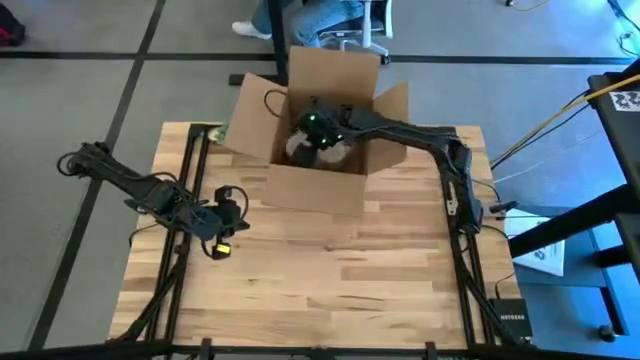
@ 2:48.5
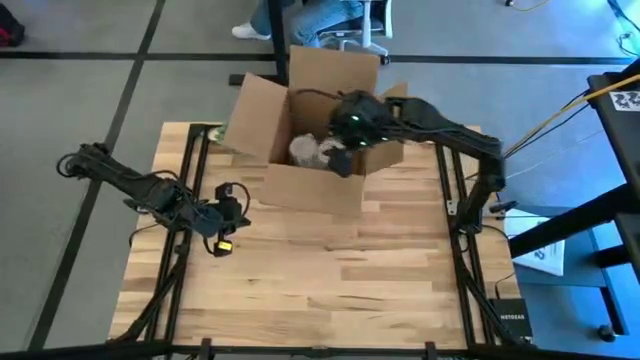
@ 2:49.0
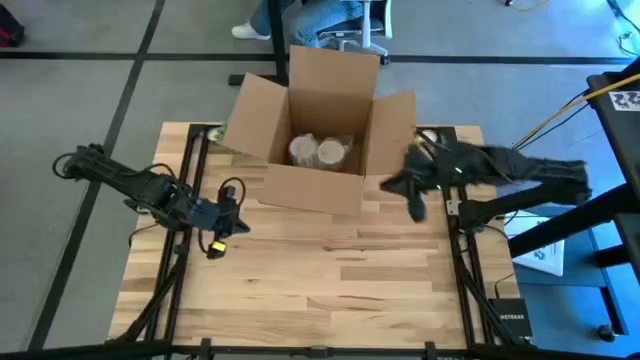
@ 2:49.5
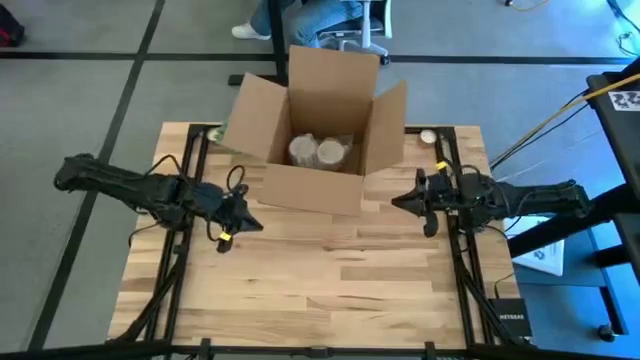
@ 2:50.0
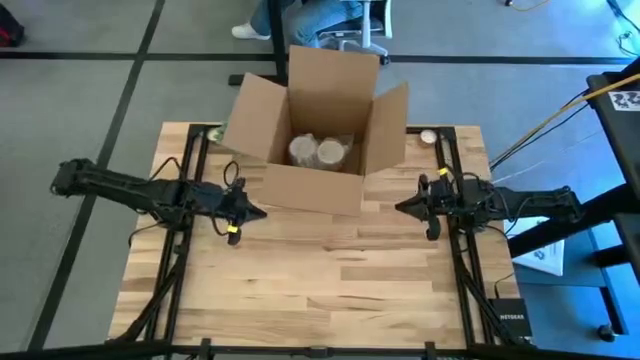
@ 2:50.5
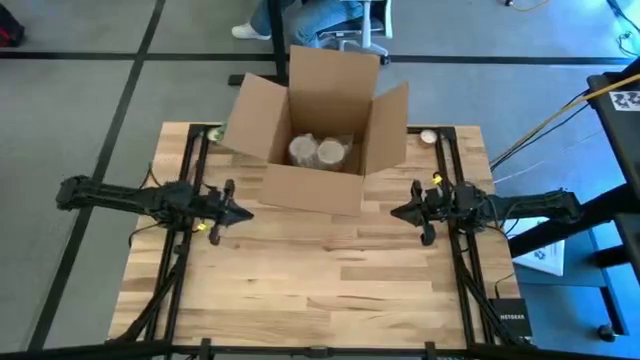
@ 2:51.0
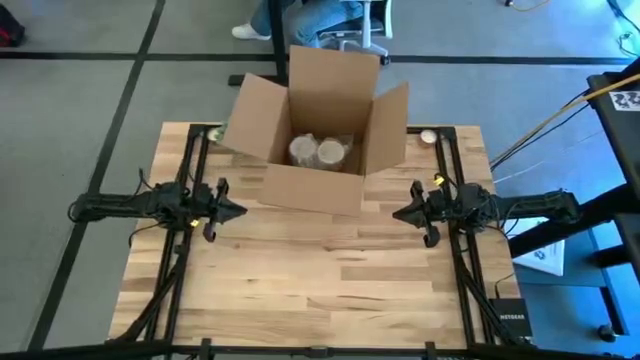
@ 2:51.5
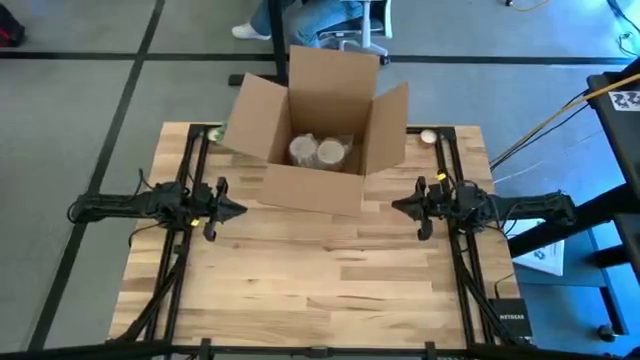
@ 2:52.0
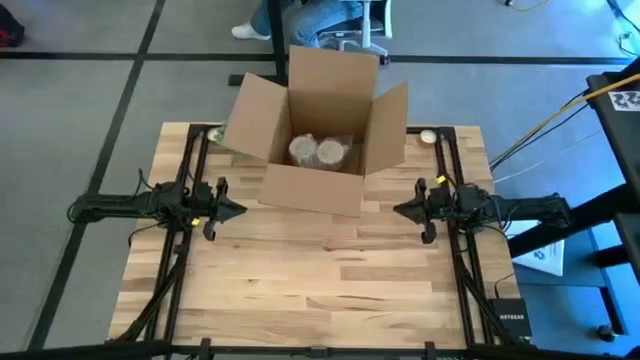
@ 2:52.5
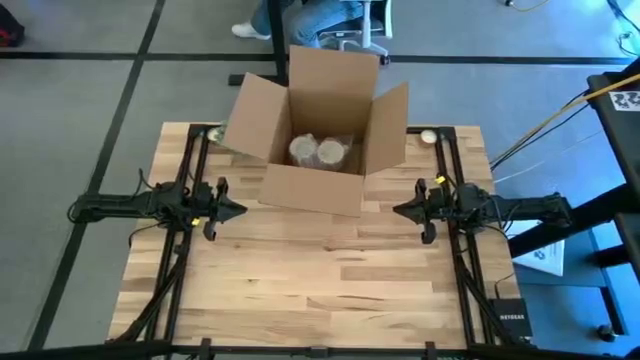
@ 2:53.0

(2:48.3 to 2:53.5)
Task: wrap mug
Return to Home Position

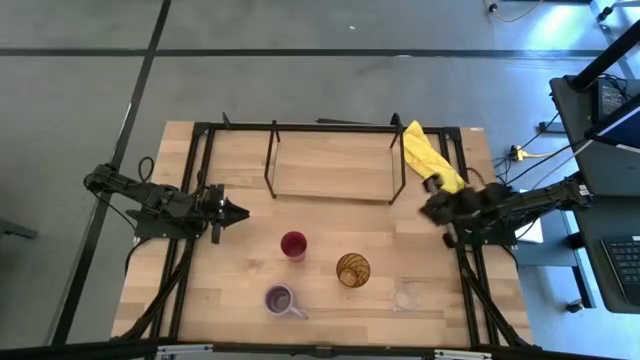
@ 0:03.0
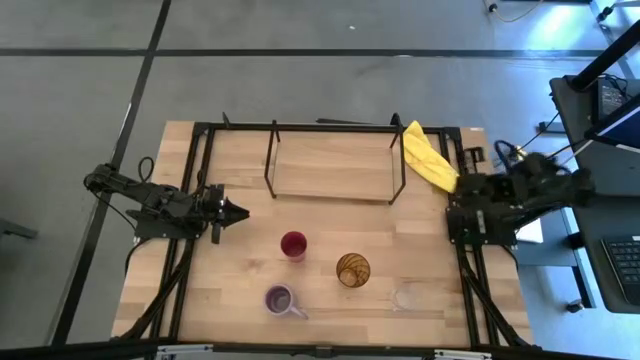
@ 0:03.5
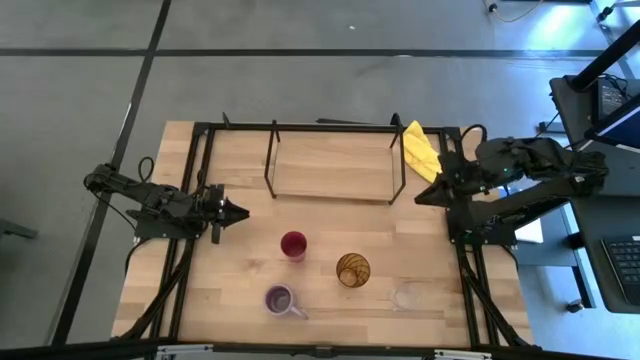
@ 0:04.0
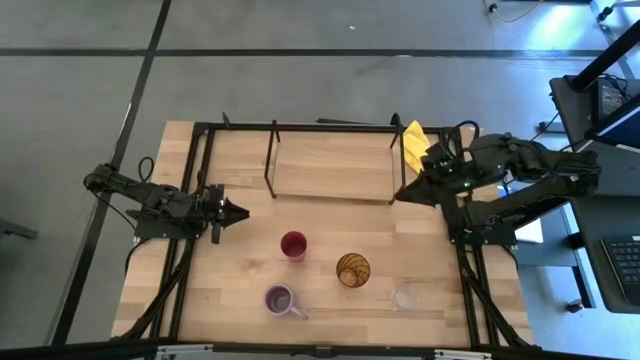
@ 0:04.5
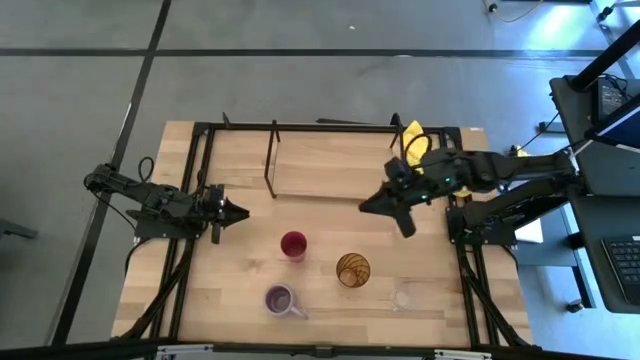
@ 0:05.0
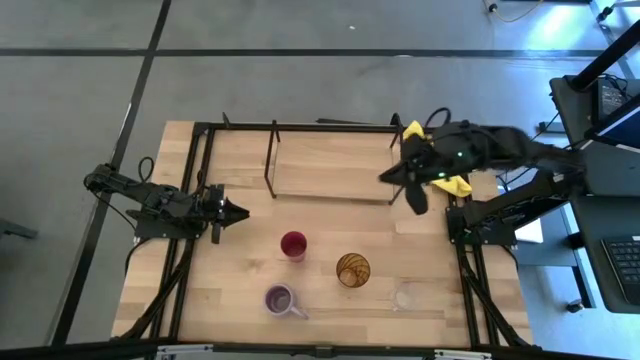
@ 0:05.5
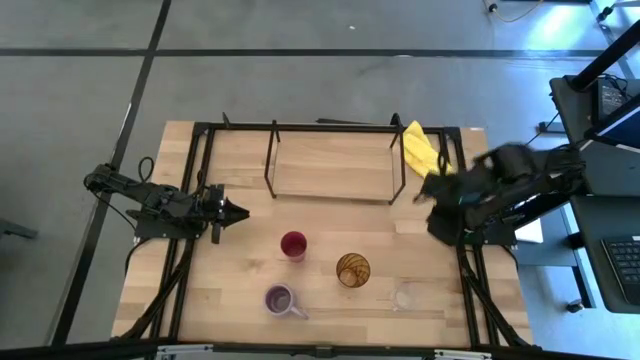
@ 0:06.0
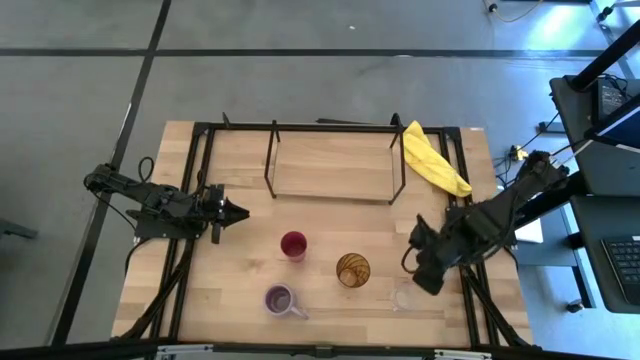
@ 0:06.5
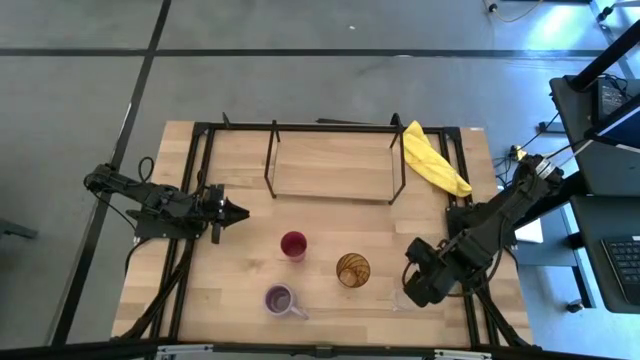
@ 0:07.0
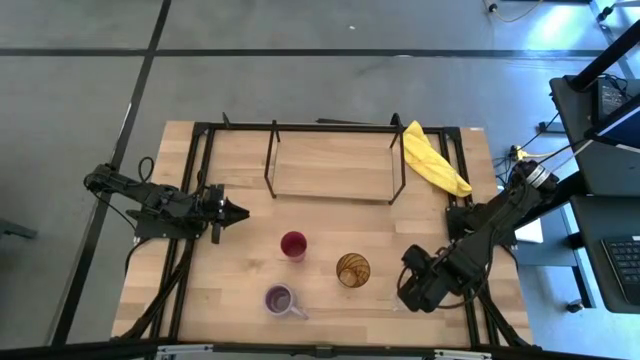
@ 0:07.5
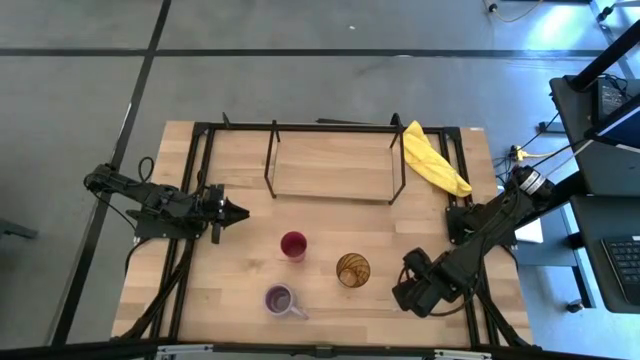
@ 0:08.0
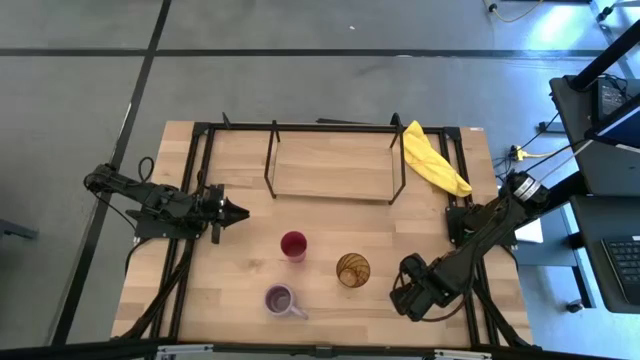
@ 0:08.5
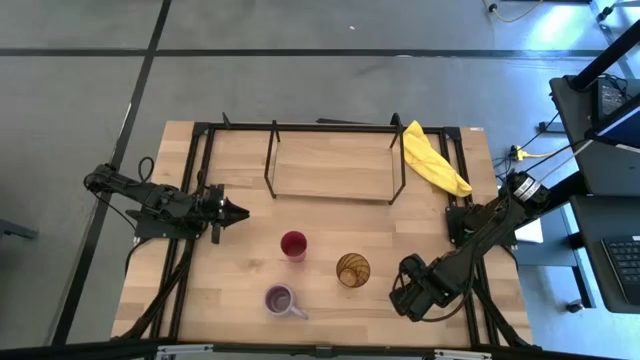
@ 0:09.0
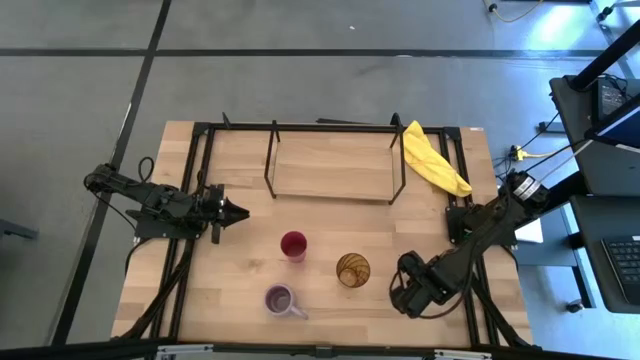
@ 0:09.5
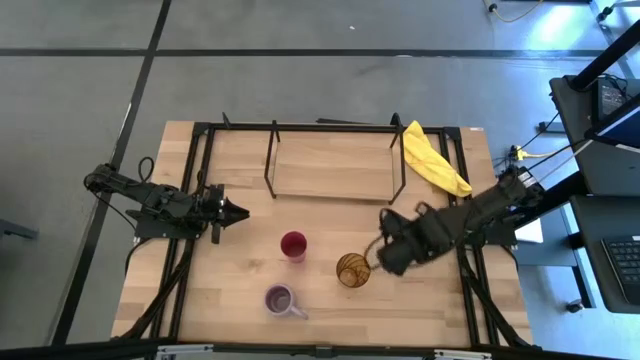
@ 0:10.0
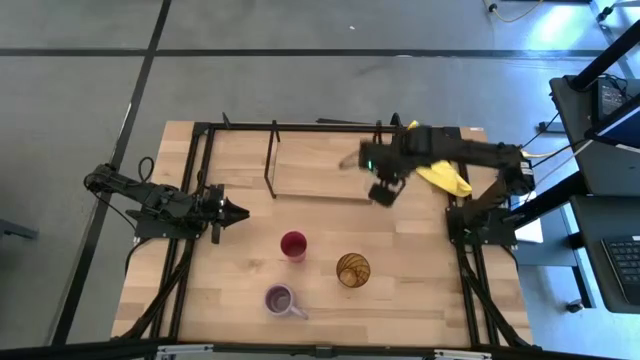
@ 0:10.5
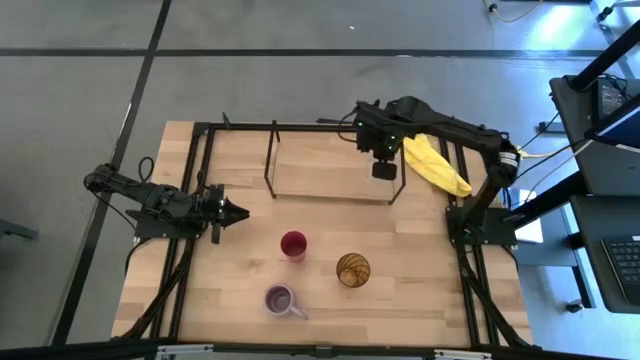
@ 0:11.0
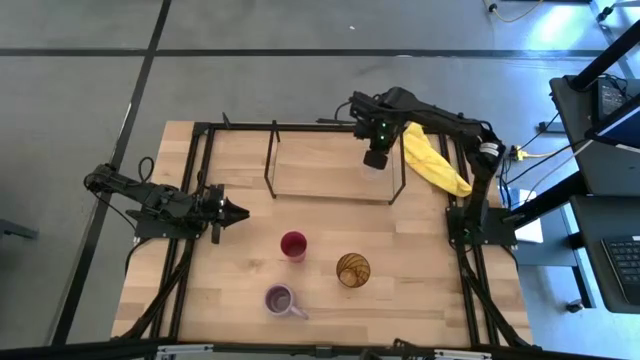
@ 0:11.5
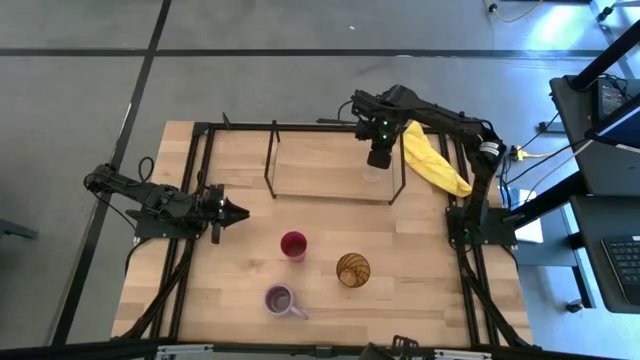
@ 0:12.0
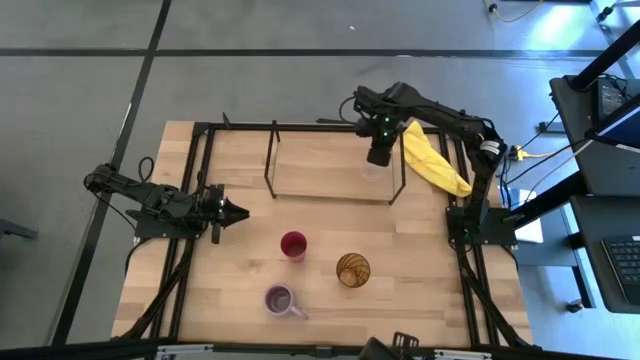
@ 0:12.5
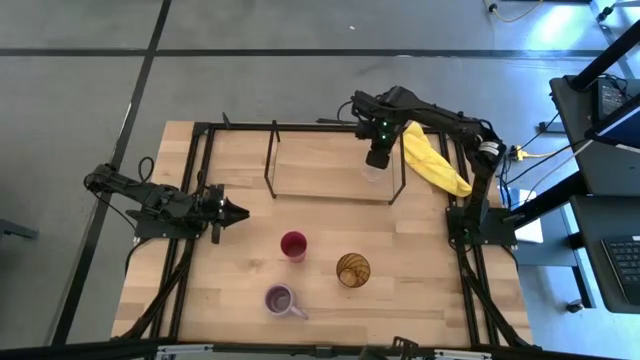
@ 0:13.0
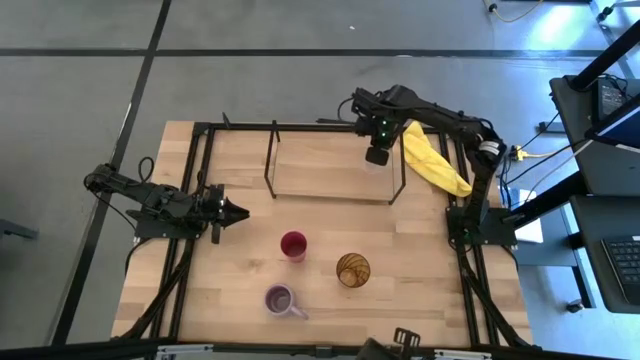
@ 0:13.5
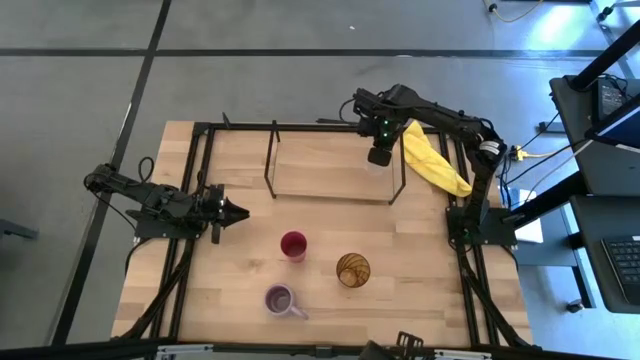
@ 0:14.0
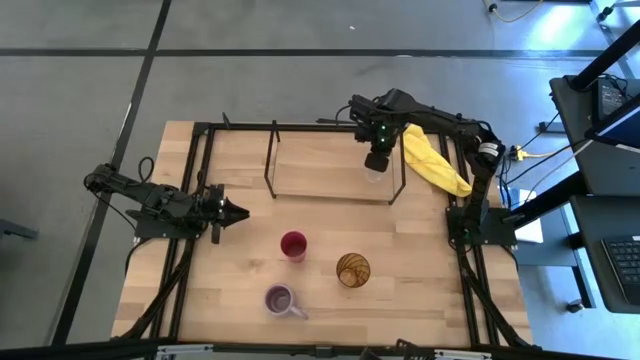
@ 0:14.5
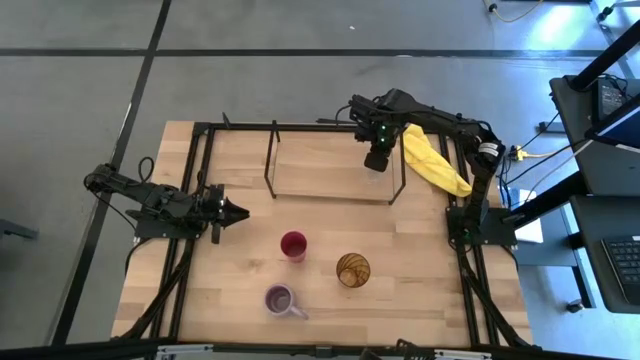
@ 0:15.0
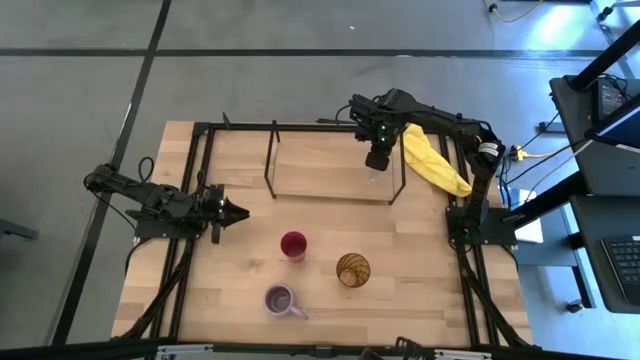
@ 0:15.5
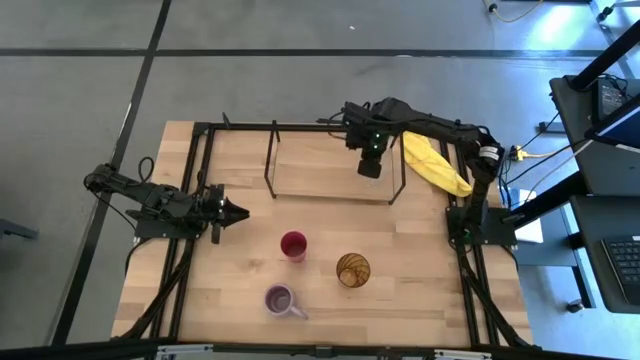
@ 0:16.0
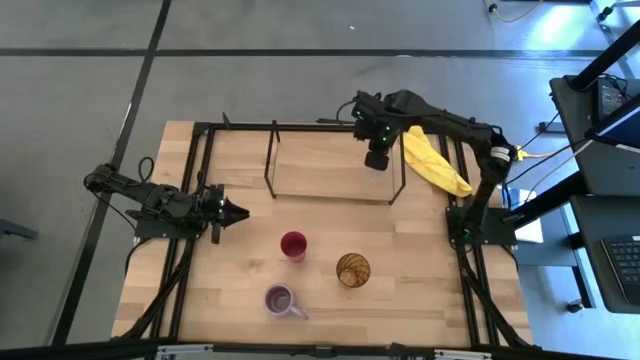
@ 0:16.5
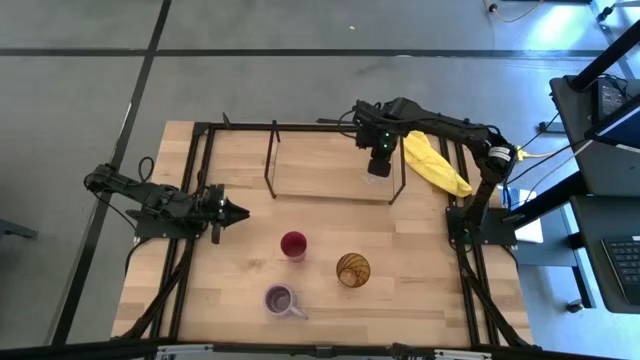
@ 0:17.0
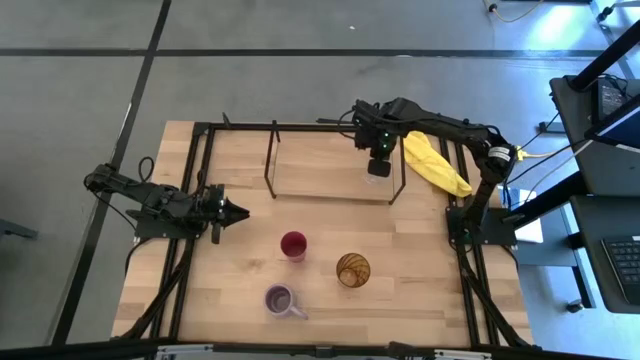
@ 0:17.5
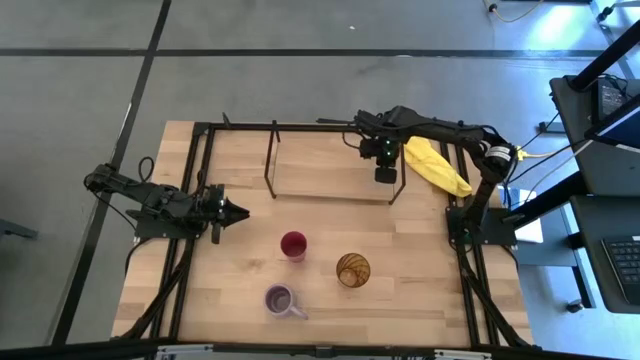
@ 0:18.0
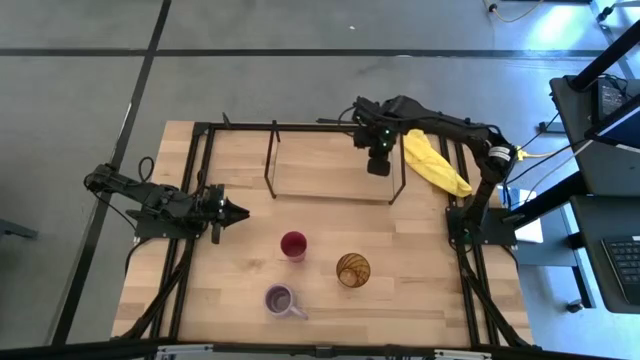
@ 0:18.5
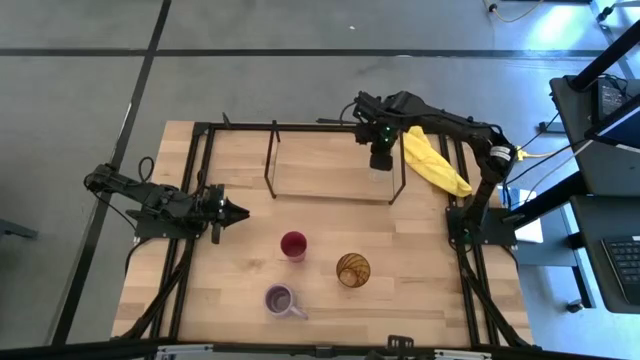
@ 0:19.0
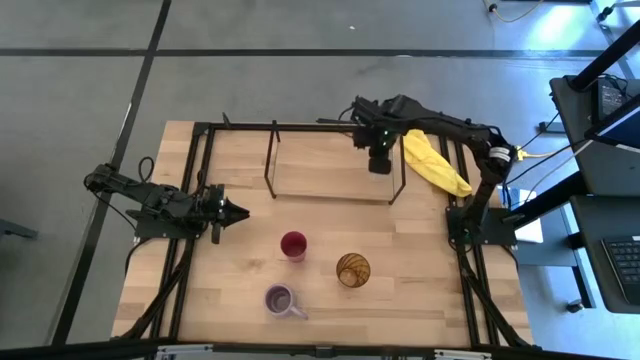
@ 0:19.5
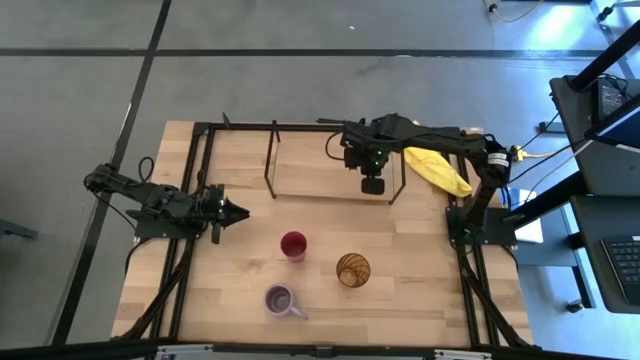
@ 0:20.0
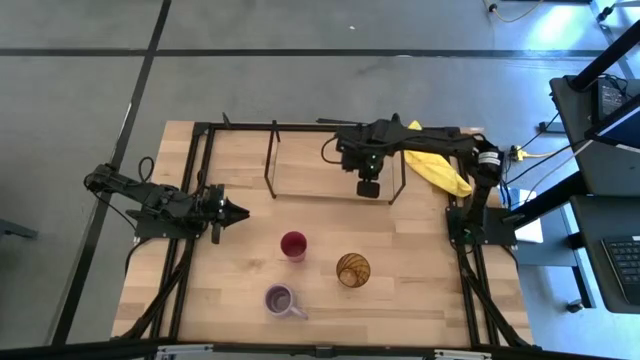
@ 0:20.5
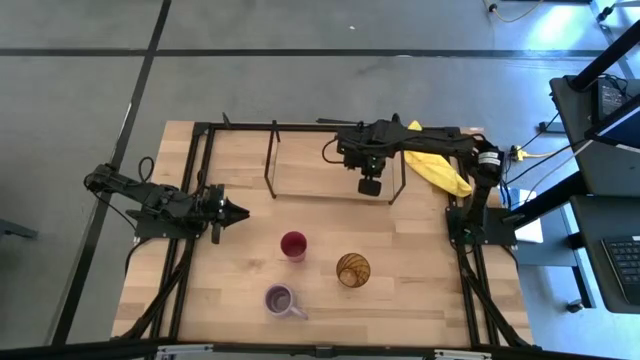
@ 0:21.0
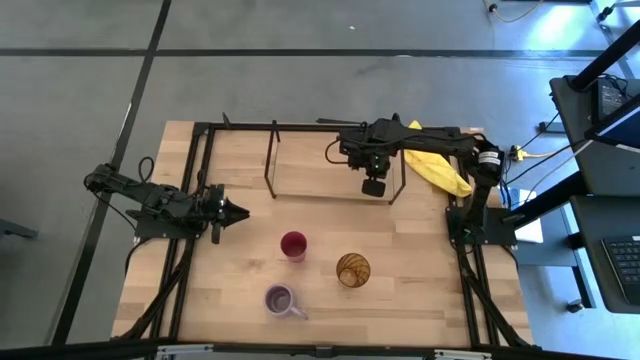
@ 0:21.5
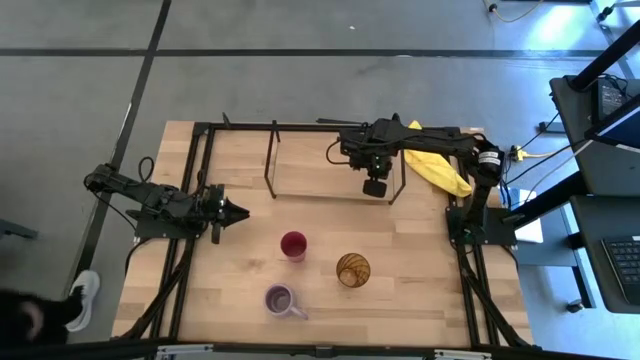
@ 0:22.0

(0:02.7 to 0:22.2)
Task: Stack small to large cups/mugs on shelf
Put the transparent mug on the shelf
